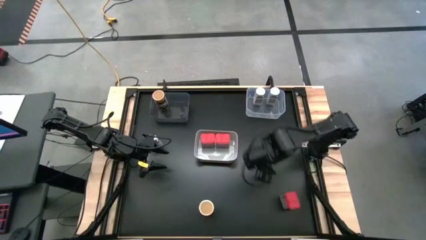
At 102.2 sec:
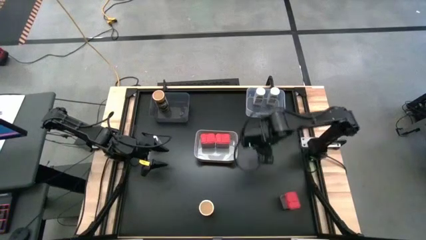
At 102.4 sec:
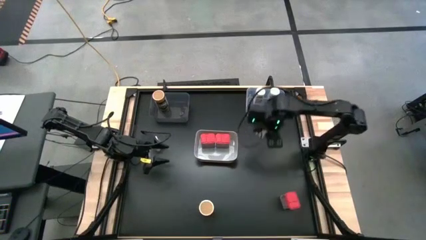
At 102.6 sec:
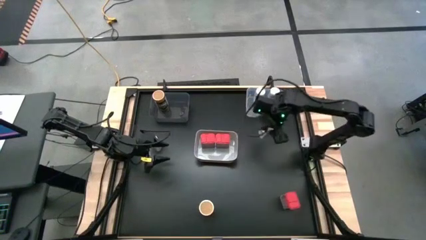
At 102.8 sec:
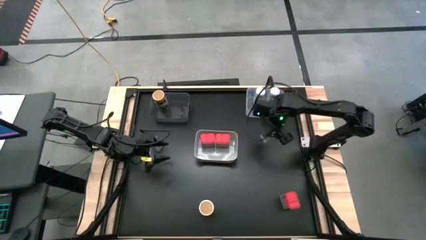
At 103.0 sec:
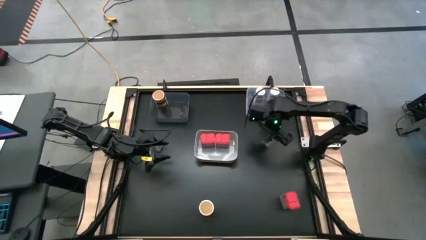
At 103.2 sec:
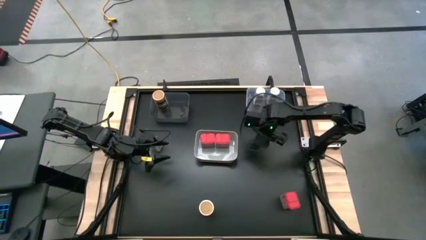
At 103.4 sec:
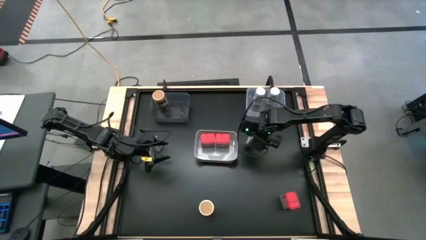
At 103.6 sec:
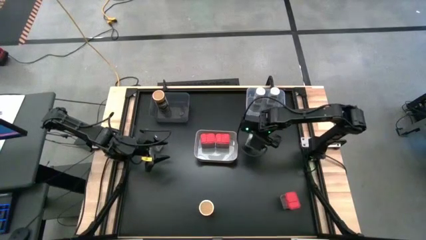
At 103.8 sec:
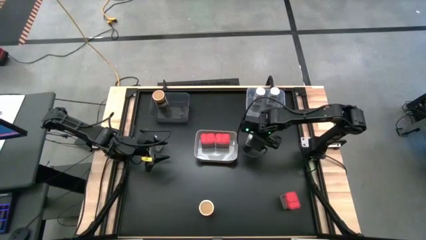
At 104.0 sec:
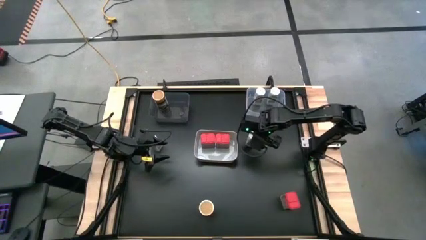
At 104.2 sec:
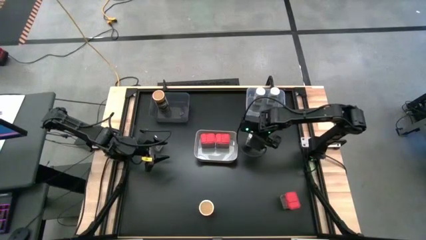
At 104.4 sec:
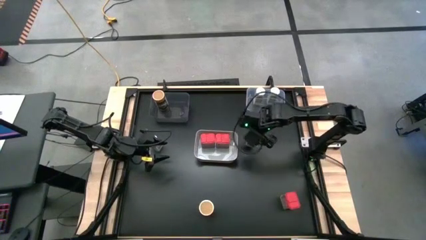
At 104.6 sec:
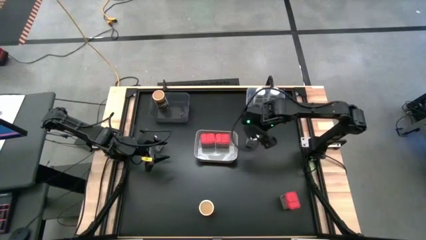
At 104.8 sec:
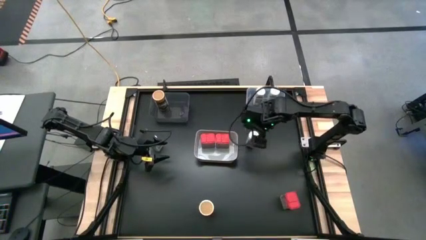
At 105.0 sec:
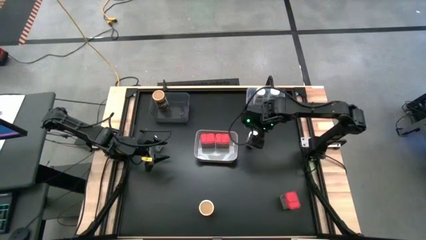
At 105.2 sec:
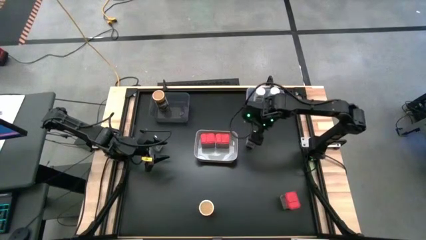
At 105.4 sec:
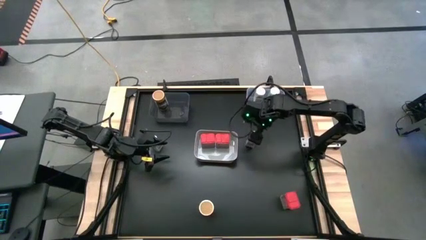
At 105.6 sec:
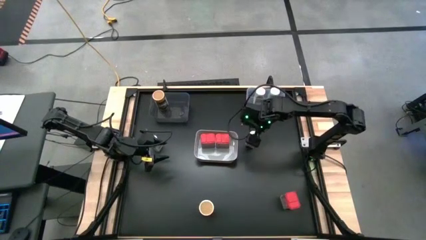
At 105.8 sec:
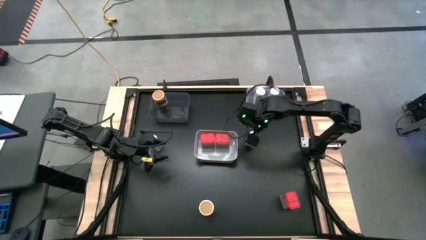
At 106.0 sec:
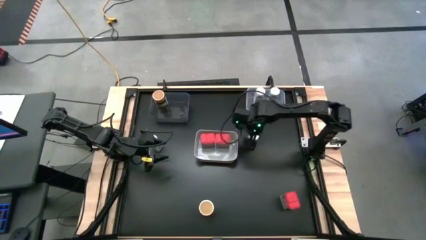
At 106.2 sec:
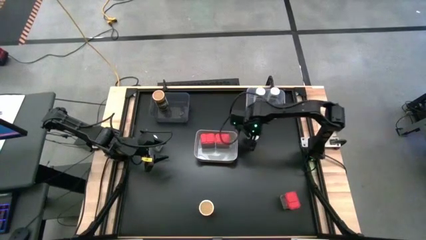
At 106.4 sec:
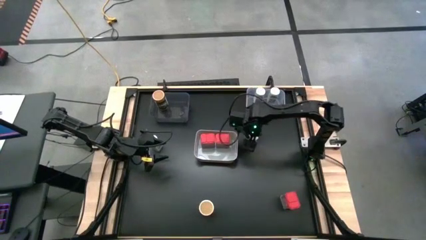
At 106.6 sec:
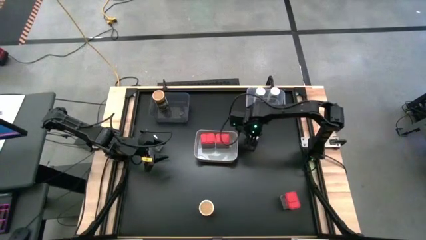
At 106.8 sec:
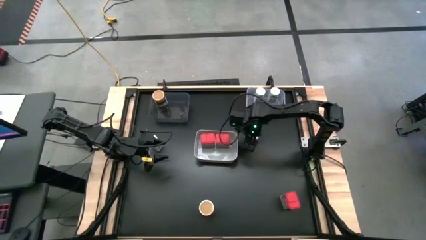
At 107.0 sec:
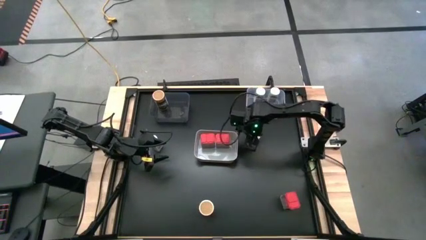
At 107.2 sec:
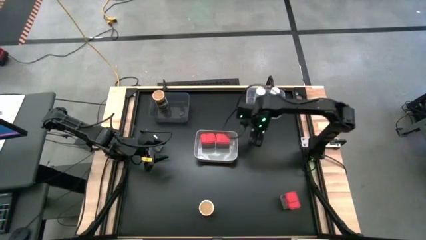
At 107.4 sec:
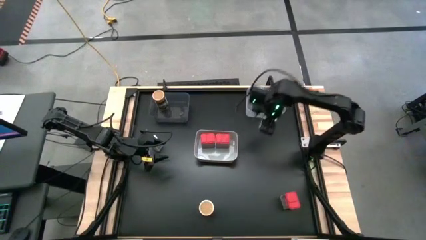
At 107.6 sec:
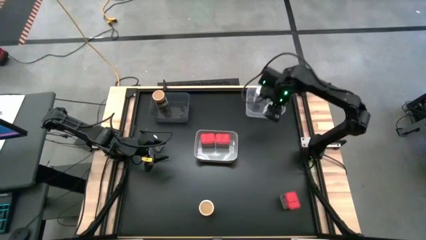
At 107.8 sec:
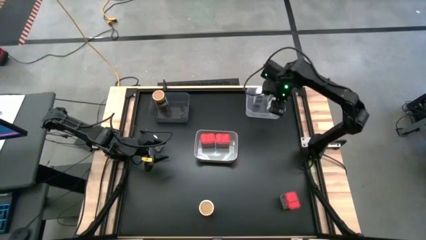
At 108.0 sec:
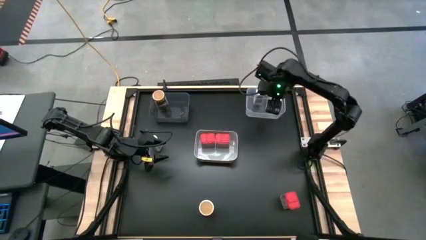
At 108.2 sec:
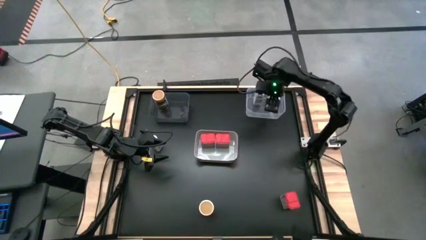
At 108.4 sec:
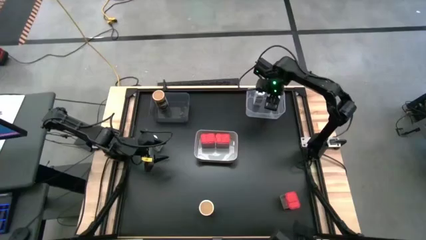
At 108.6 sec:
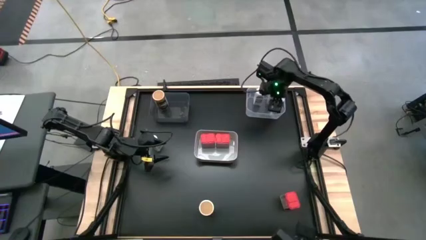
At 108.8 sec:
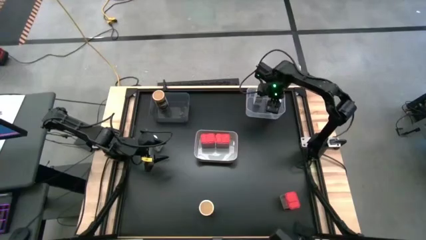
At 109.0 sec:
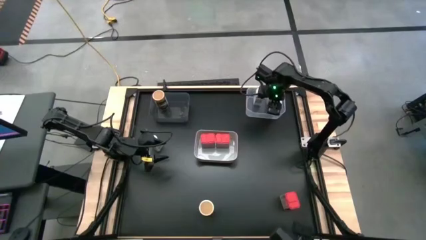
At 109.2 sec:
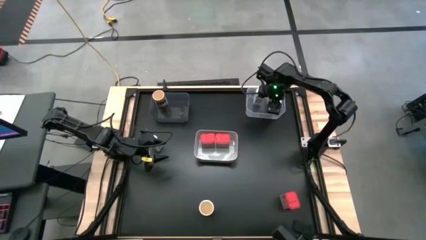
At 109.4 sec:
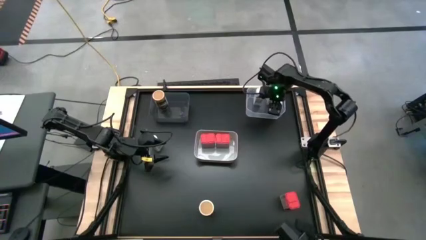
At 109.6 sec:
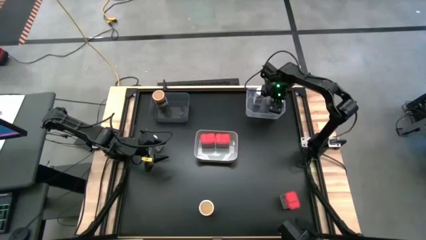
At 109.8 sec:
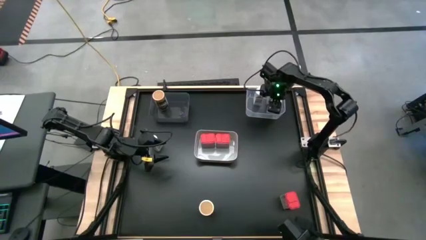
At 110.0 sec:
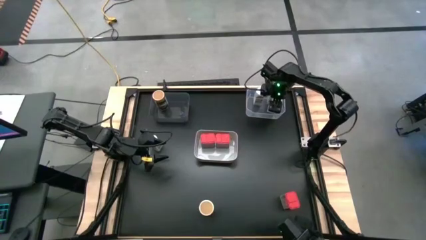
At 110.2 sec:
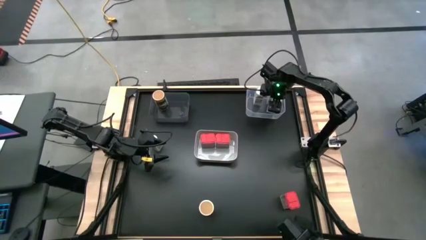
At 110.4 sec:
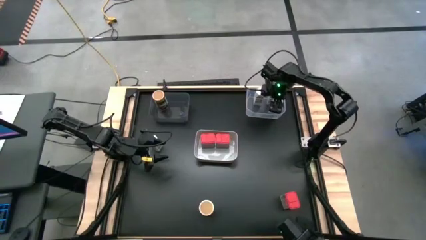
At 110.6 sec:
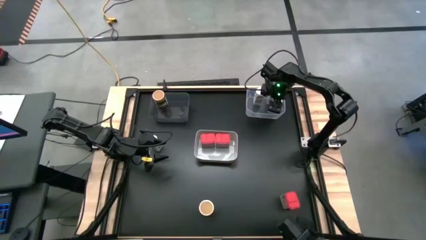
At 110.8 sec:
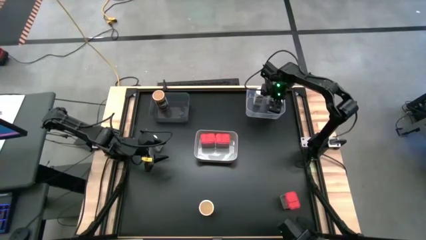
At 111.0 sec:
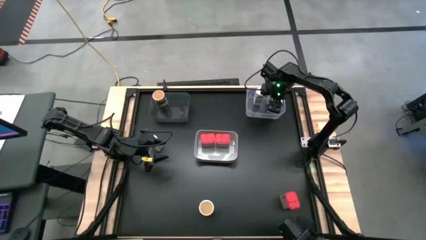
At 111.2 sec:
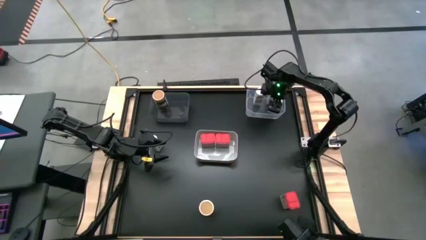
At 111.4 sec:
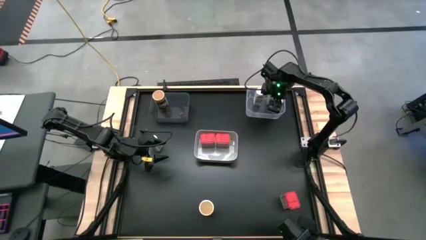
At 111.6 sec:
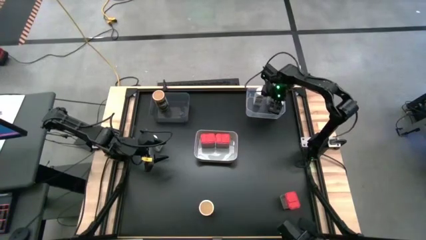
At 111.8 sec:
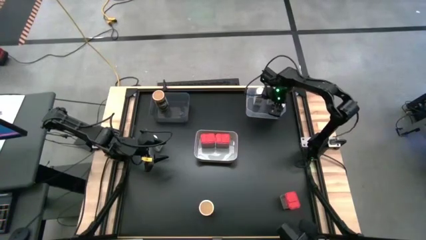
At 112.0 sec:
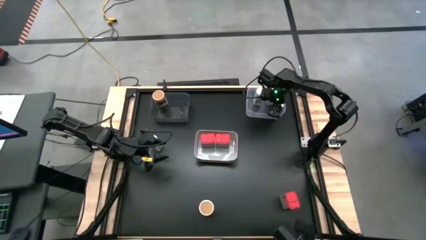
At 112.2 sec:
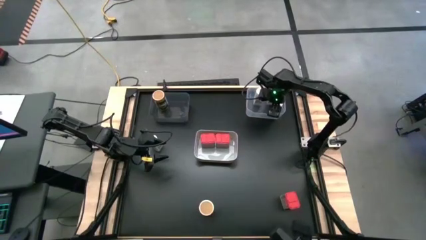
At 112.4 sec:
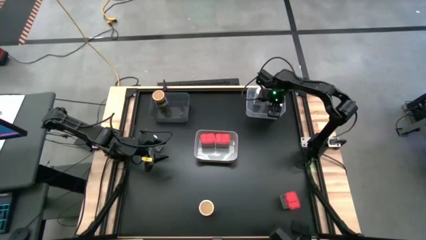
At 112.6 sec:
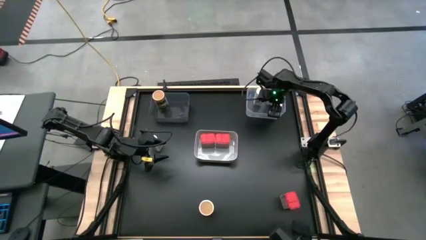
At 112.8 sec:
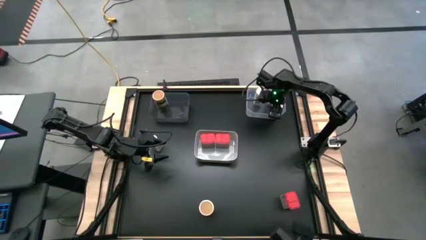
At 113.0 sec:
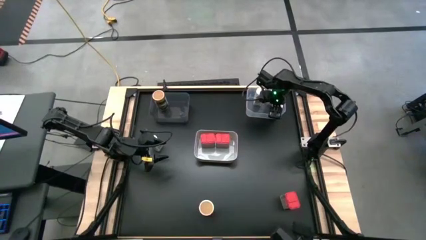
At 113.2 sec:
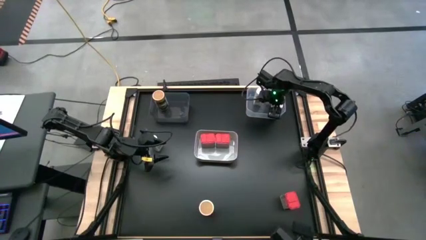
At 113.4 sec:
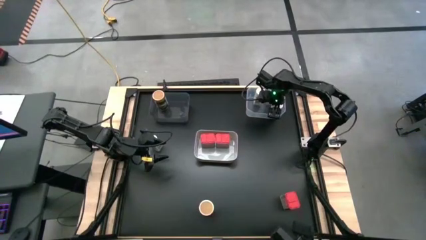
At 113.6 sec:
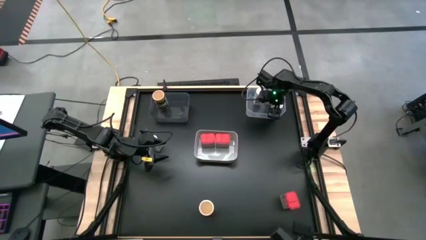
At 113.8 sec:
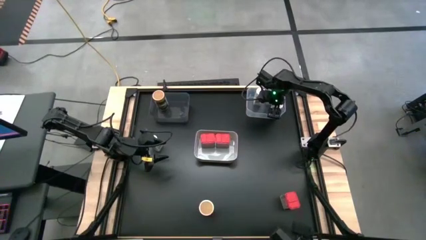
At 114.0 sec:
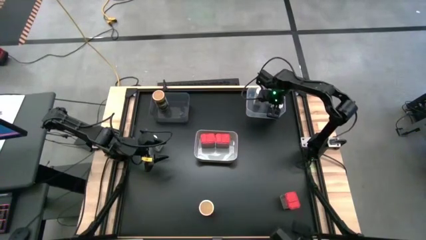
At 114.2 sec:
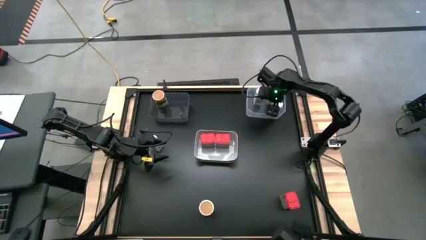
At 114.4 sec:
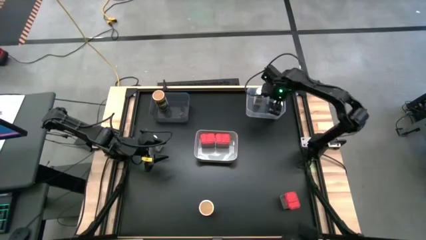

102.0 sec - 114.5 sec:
Task: Sort spices by type
Put the white seasoning bottle into the transparent bin

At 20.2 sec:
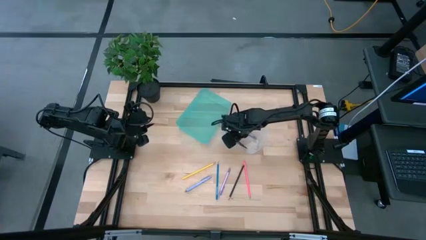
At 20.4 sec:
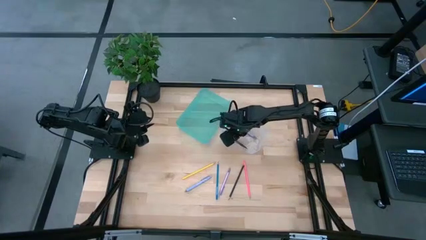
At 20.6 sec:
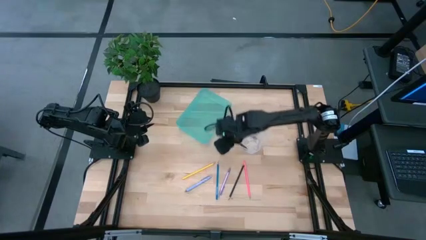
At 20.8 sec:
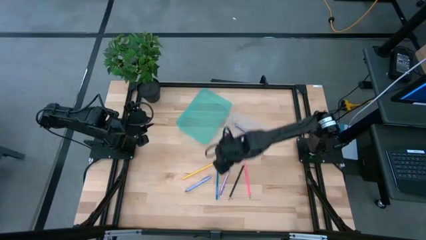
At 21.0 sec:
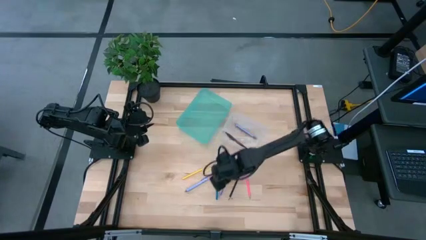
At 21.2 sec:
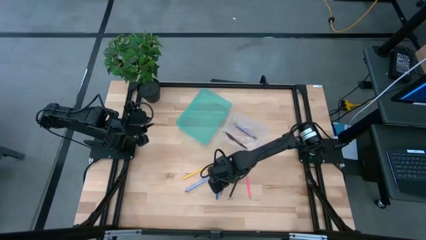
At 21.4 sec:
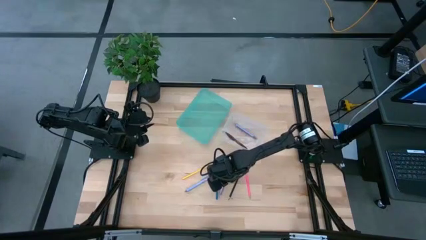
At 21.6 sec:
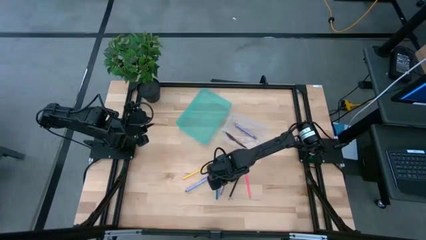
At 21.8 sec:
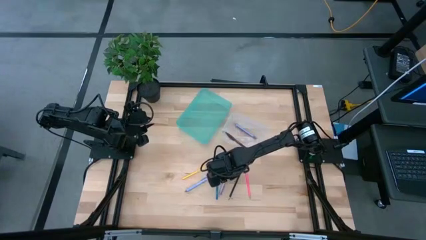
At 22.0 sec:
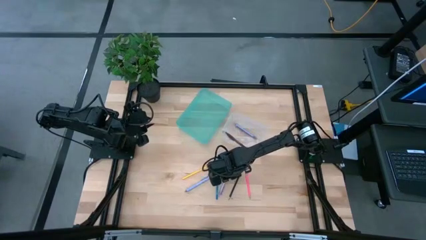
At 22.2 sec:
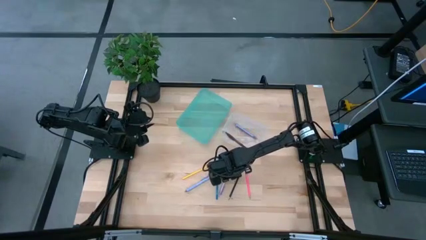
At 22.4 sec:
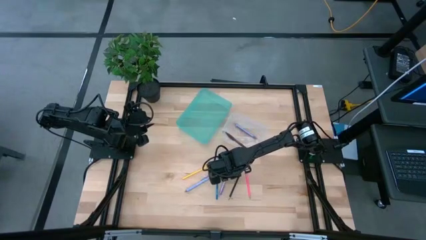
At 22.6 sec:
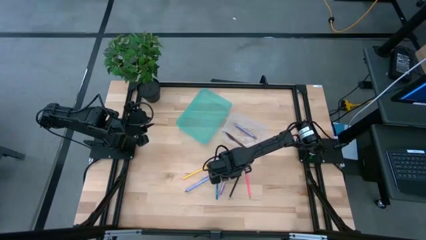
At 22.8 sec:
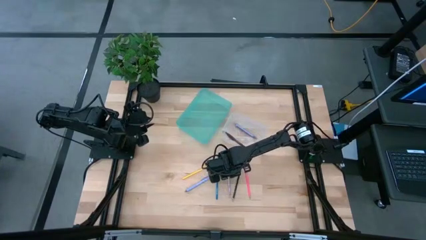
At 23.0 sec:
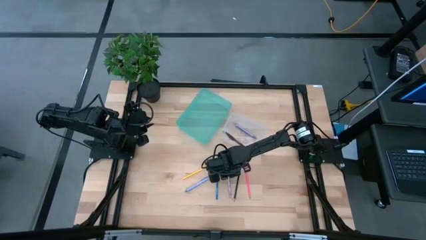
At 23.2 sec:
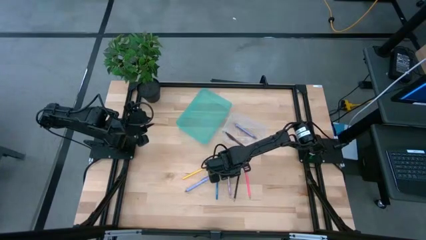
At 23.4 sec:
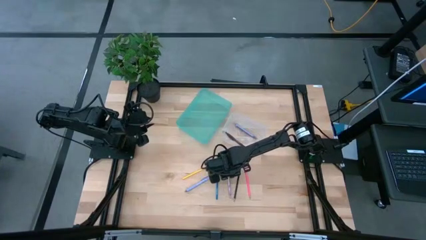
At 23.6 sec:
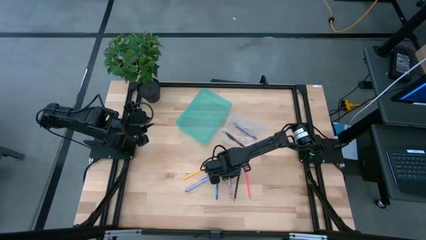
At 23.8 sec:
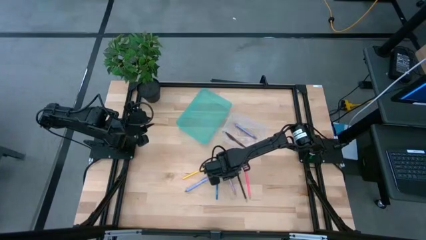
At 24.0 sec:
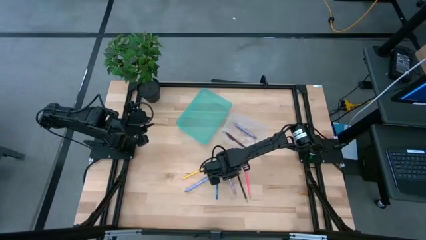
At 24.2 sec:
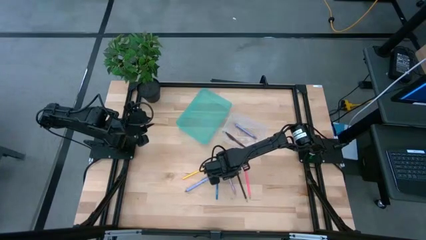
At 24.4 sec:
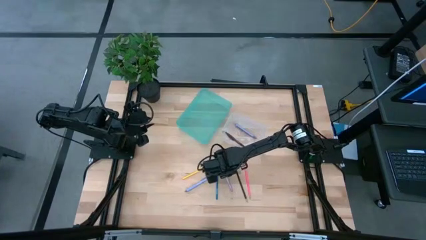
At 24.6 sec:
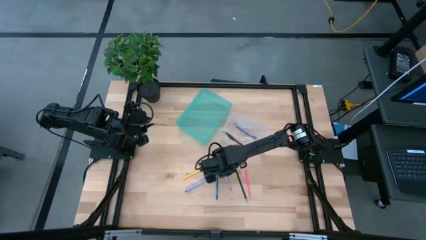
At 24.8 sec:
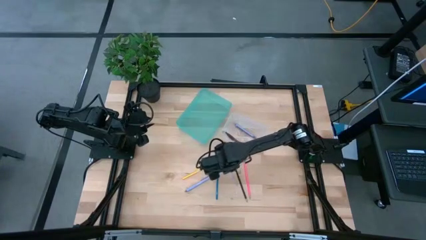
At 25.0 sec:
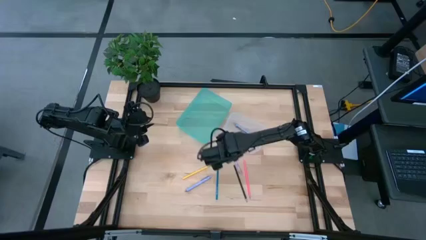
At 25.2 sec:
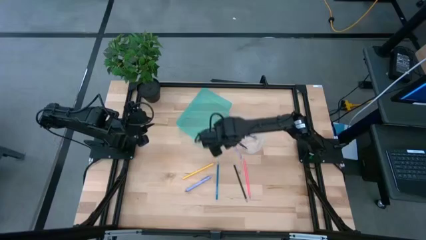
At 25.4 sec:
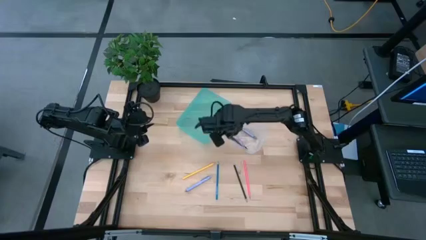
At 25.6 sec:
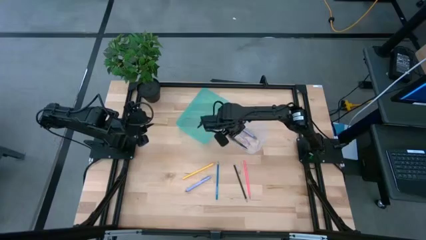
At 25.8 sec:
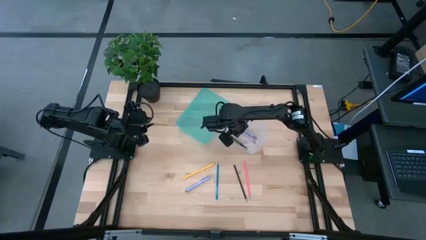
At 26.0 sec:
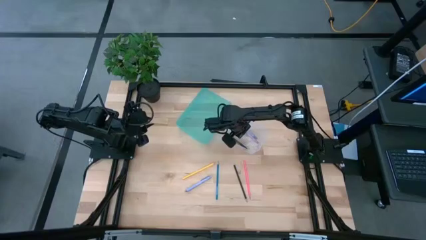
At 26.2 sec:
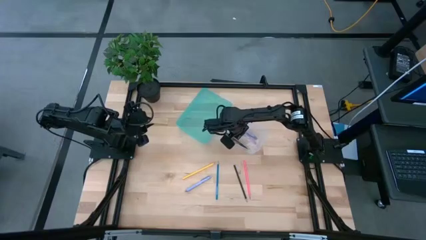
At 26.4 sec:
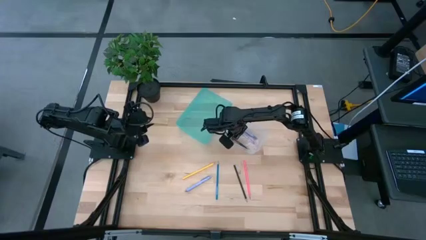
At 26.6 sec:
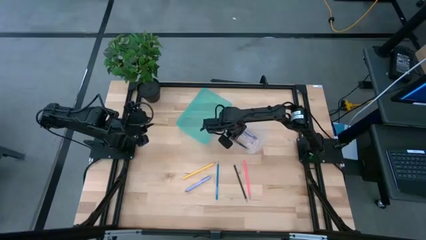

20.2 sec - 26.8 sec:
Task: Sort pens & pencils
Put the light purple pen into the transparent bin
